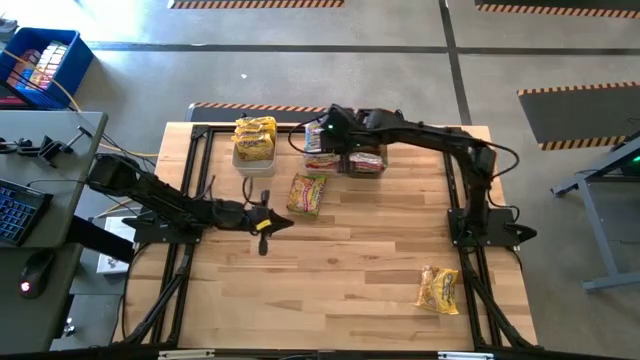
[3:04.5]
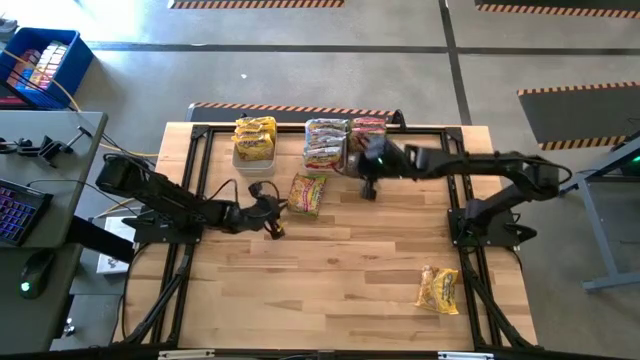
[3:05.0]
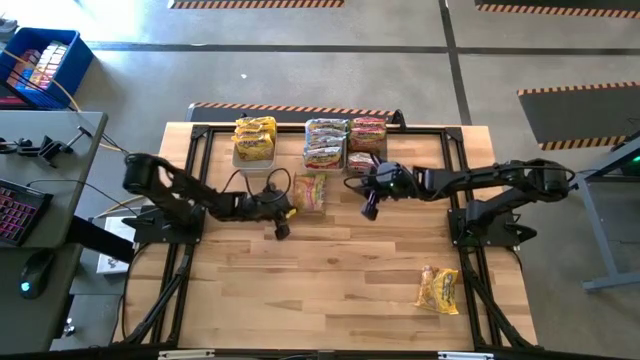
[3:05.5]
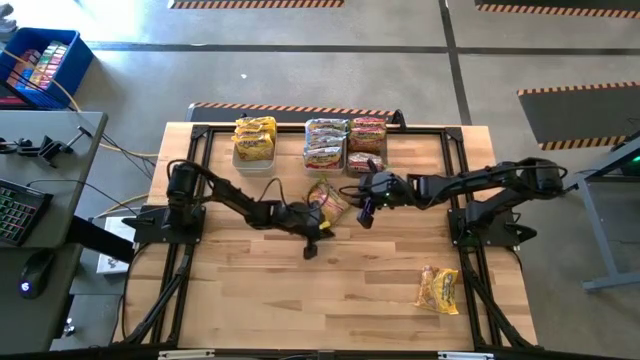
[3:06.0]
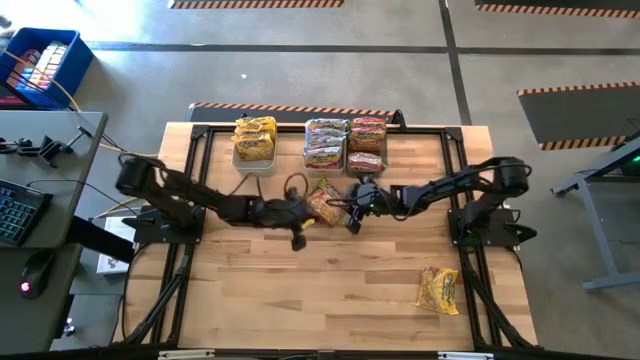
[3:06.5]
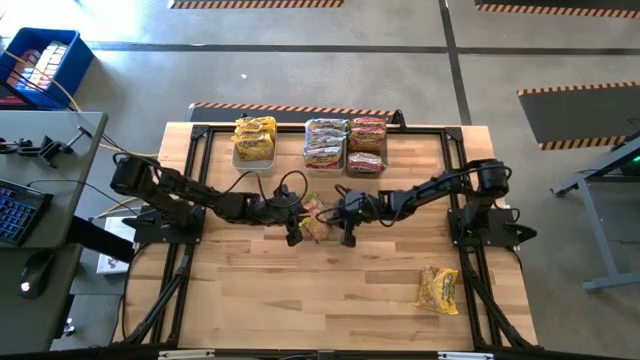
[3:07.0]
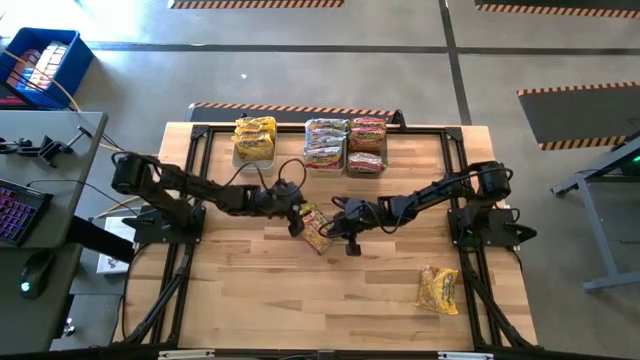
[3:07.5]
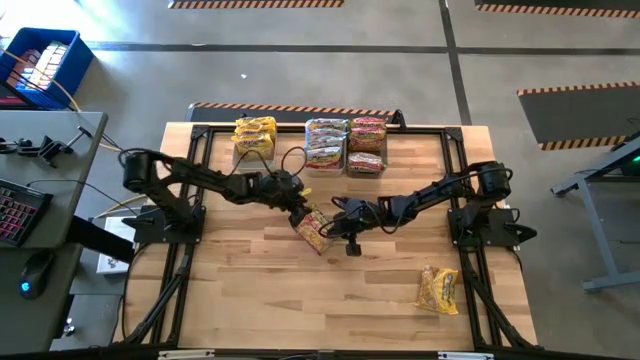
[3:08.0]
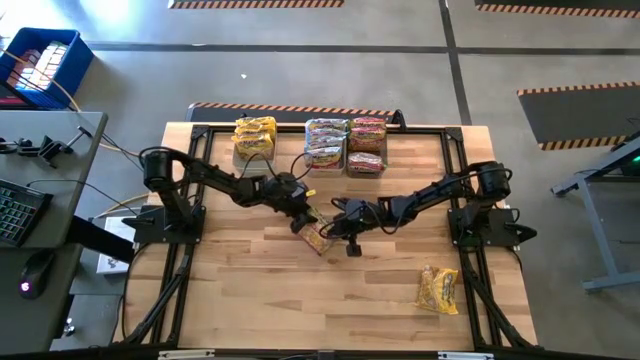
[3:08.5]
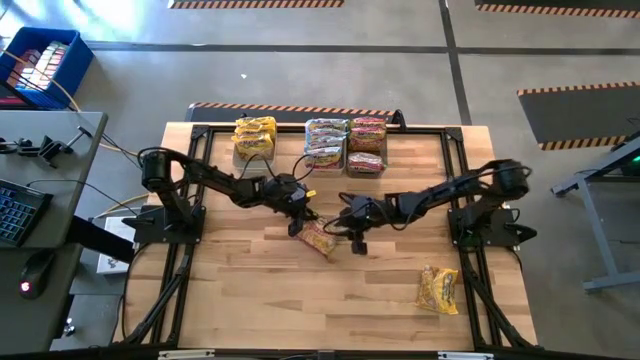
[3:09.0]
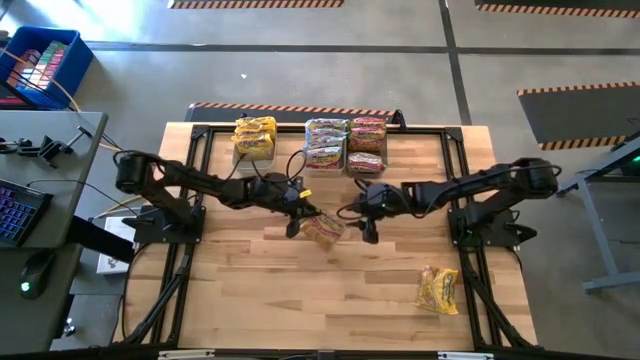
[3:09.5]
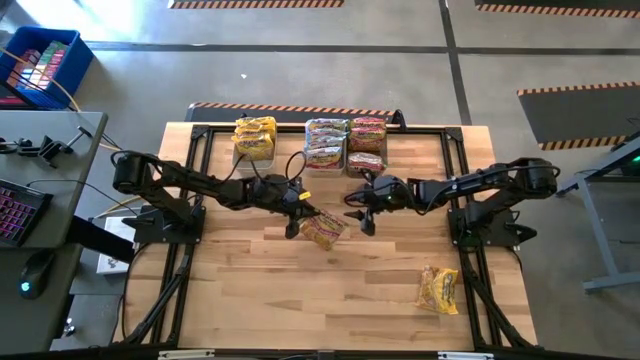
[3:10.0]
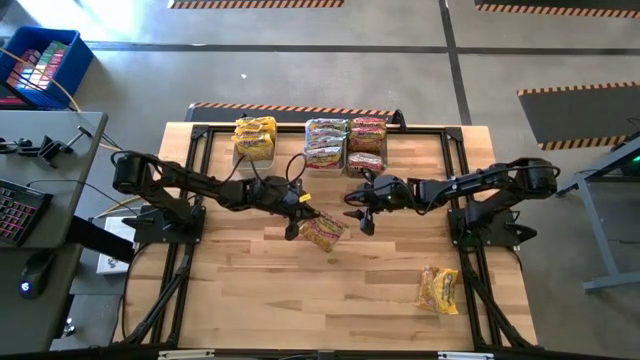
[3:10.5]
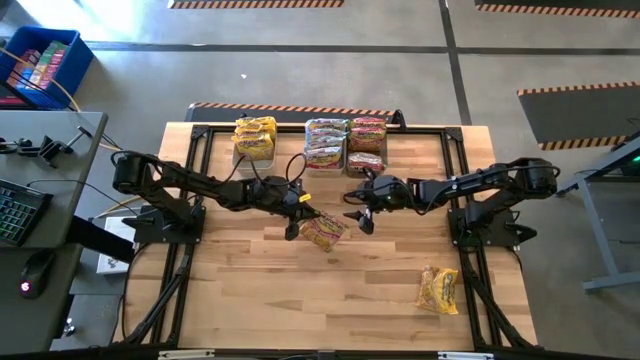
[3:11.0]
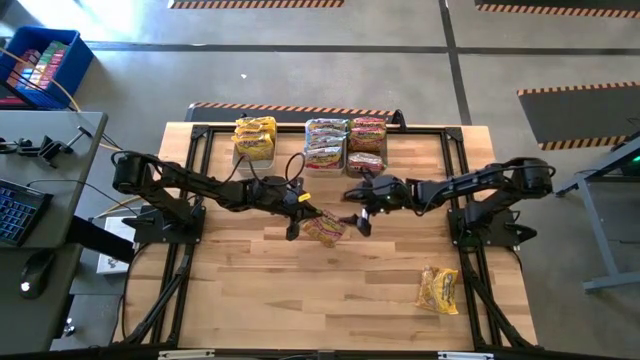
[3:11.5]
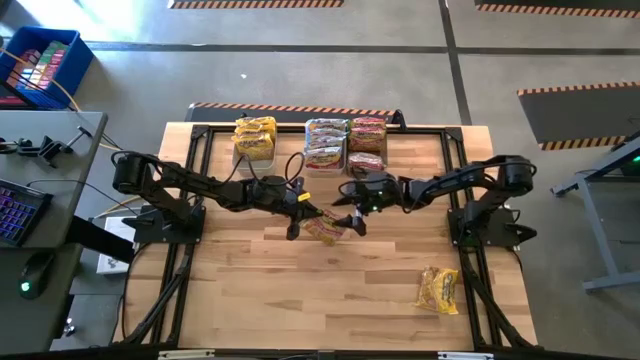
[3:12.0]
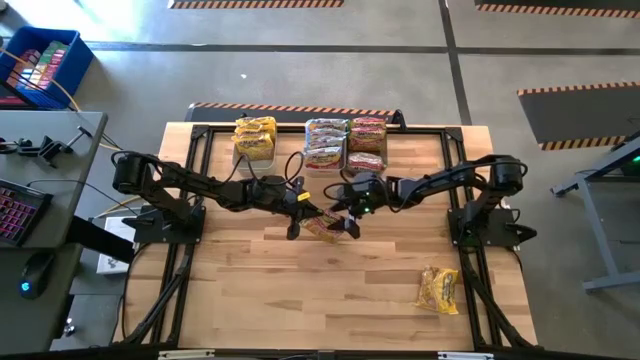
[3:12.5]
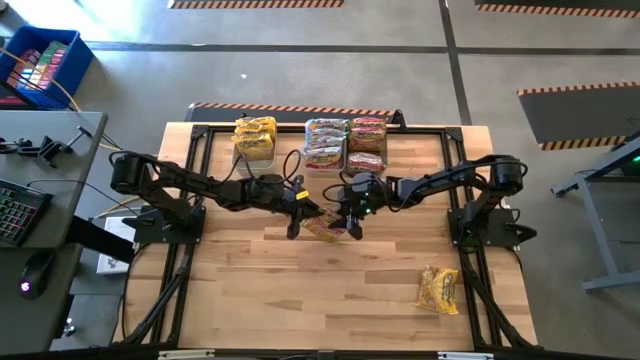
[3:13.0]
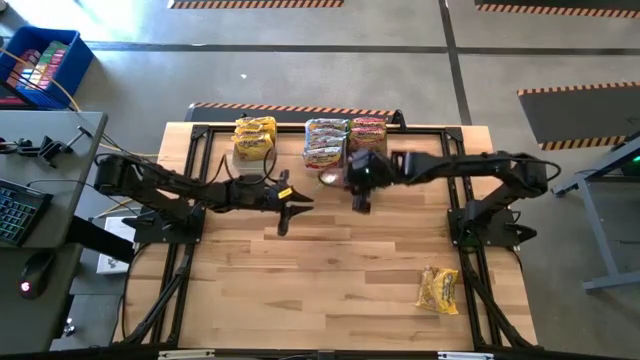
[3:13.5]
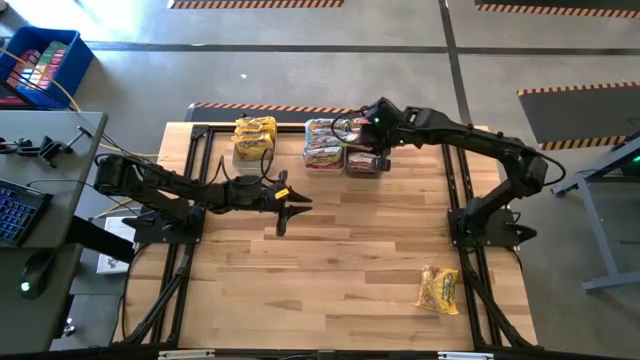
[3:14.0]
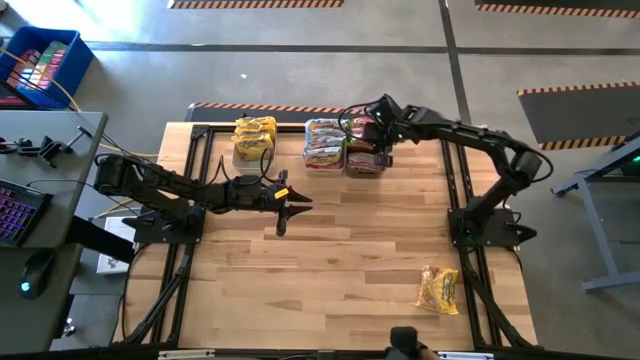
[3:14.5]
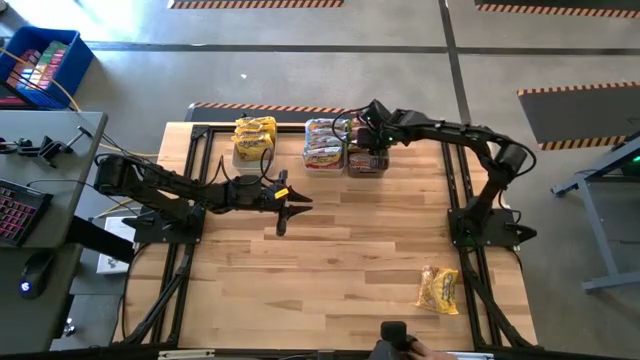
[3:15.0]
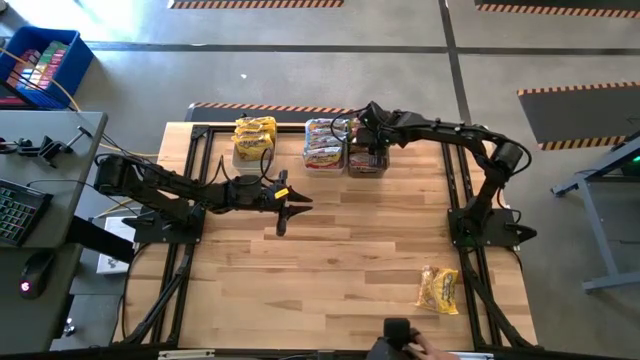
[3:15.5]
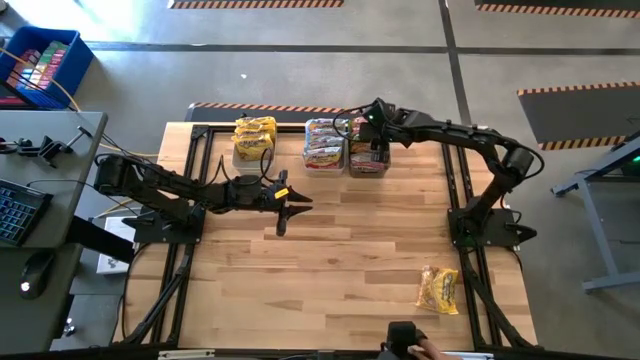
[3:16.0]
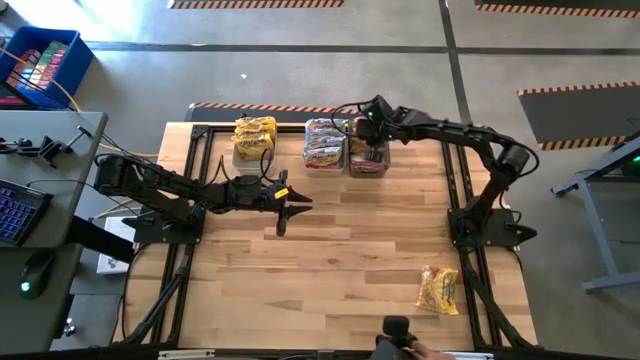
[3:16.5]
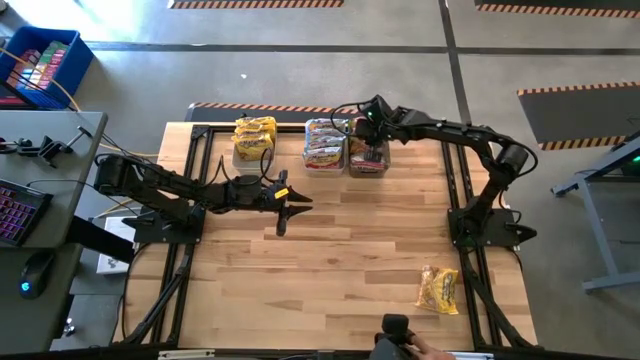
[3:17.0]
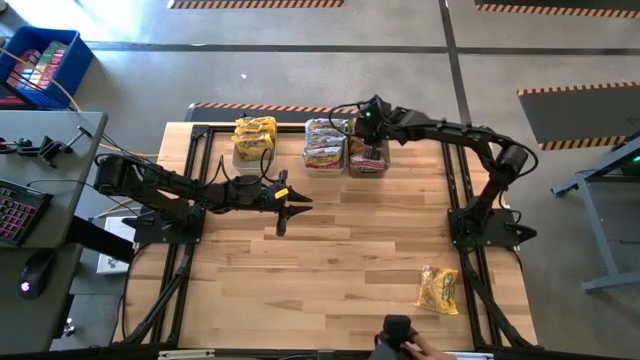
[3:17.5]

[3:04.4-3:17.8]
Task: Sort Maruchan noodles
Put the green noodle pack into the transparent black bin

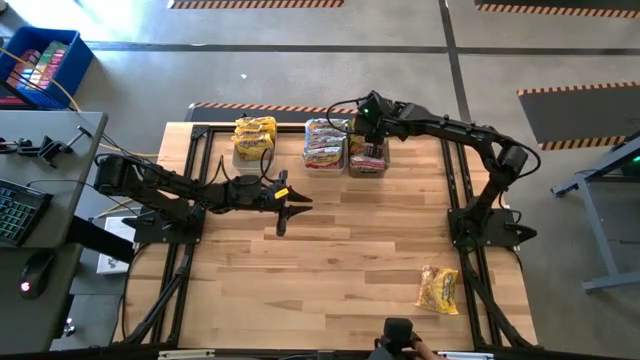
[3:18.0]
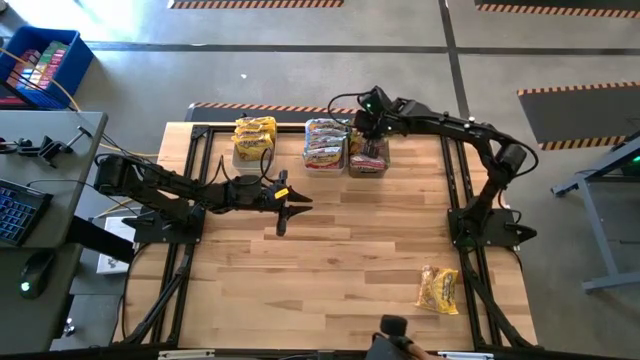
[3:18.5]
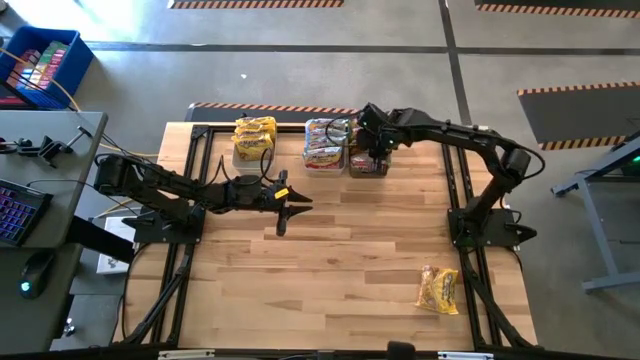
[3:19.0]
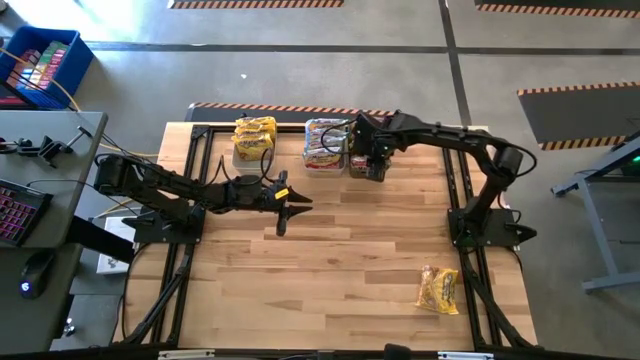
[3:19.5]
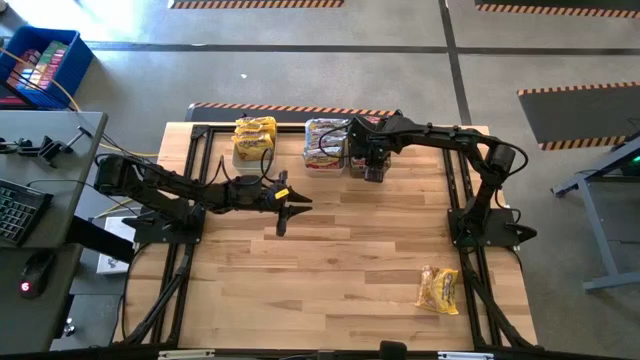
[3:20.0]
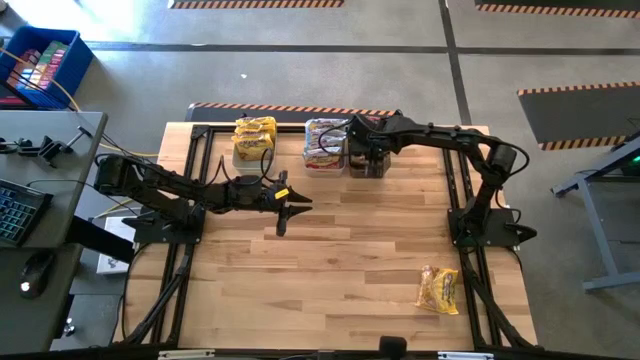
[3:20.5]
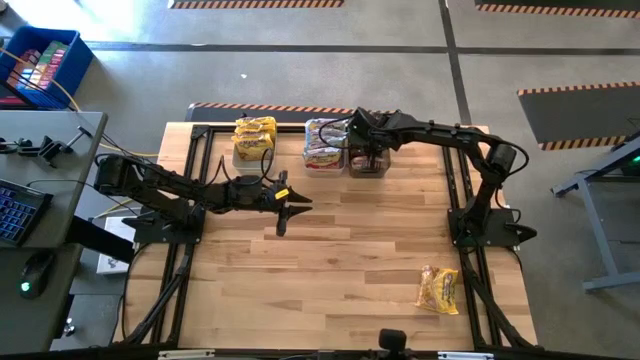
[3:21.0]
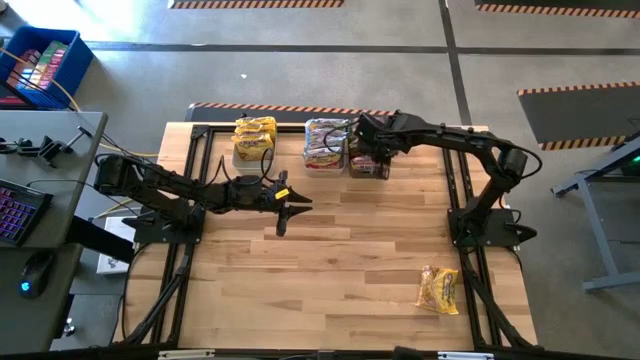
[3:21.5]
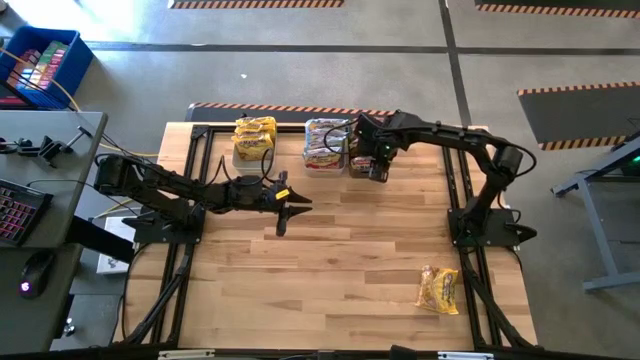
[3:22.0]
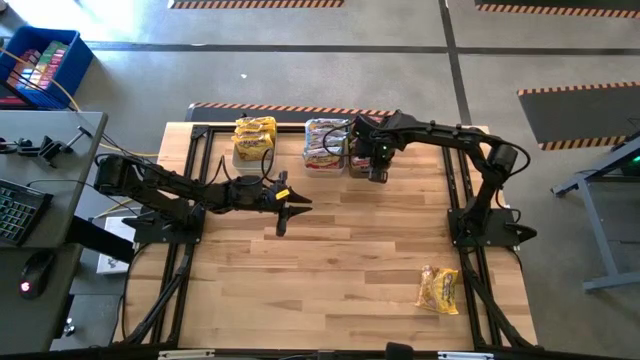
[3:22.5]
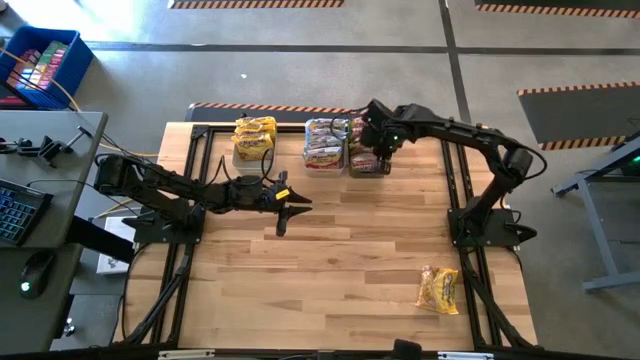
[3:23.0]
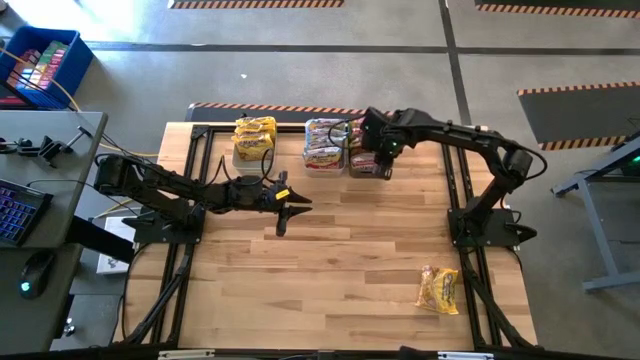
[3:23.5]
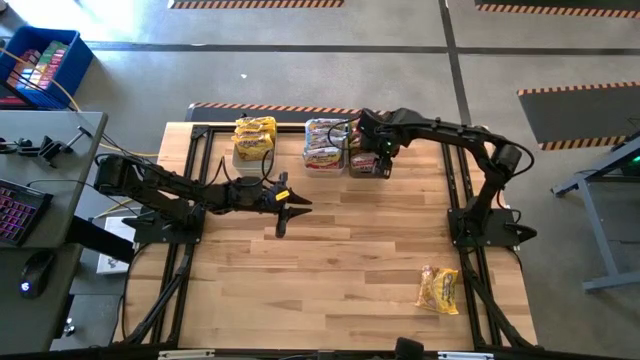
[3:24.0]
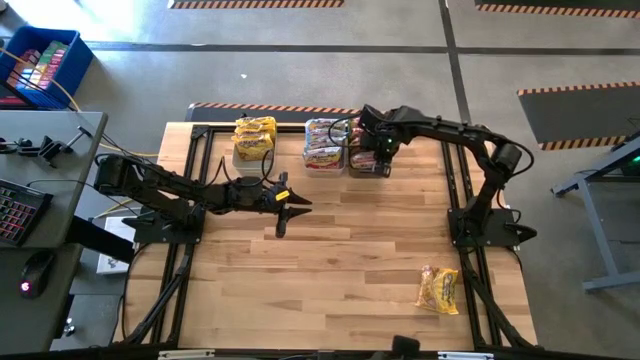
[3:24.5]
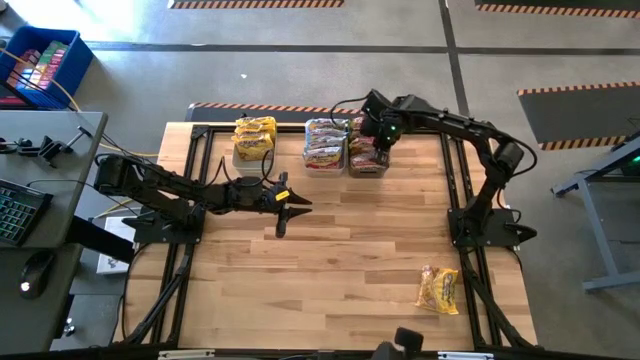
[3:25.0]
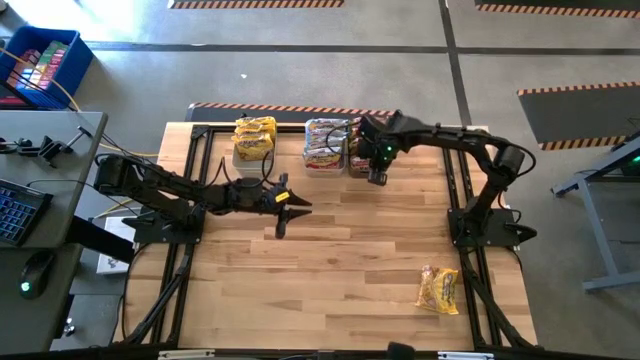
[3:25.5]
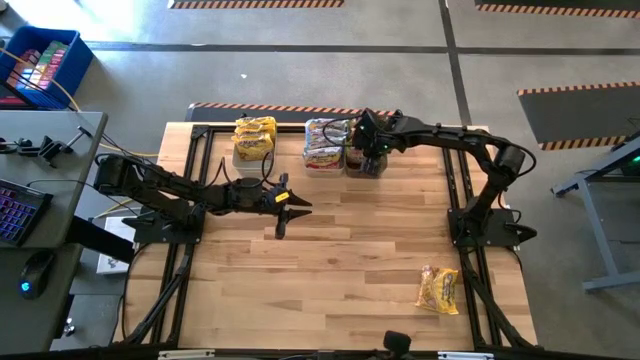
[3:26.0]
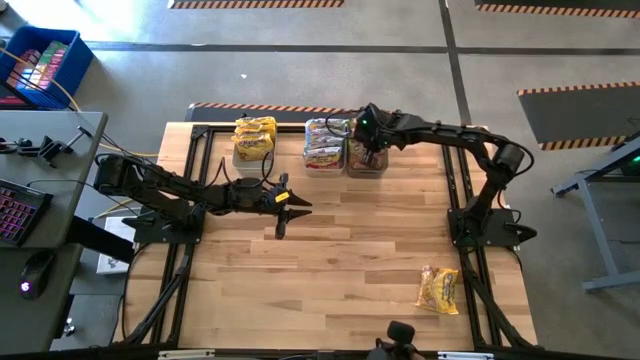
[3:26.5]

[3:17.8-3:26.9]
Adjust the green noodle packs on the transparent black bin
